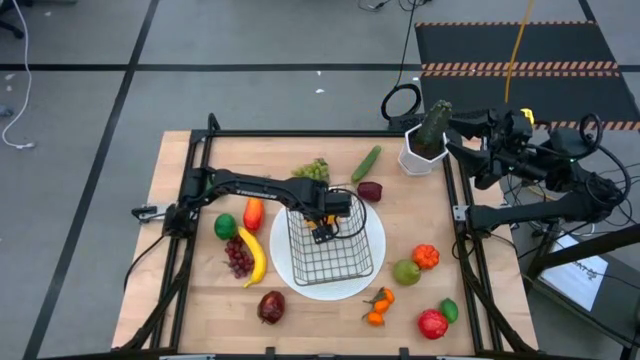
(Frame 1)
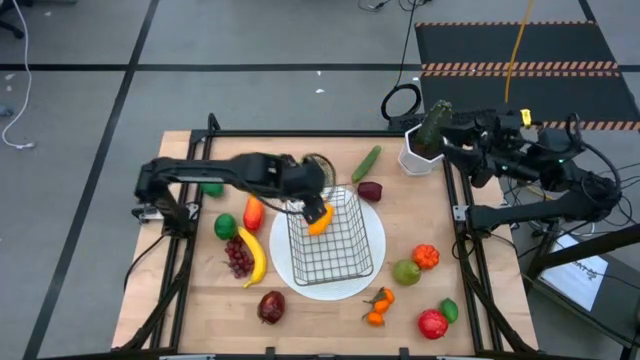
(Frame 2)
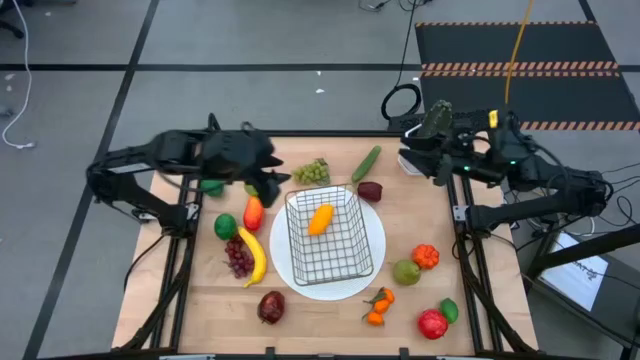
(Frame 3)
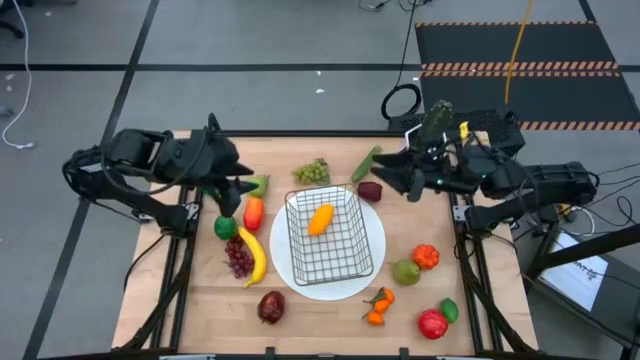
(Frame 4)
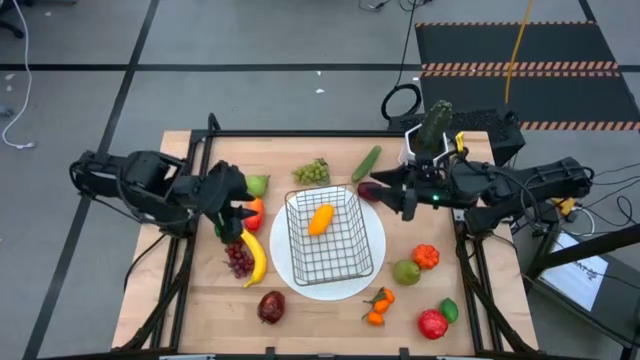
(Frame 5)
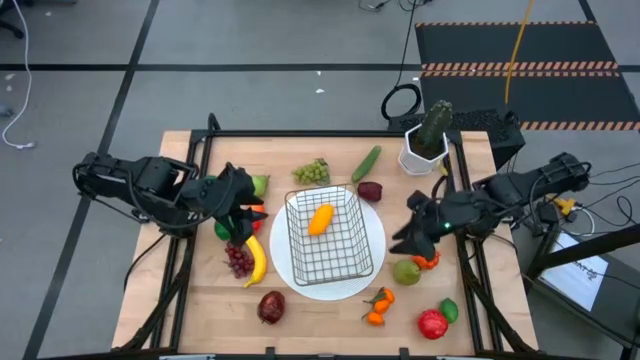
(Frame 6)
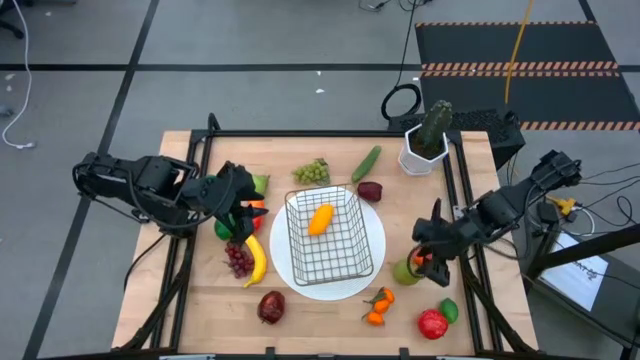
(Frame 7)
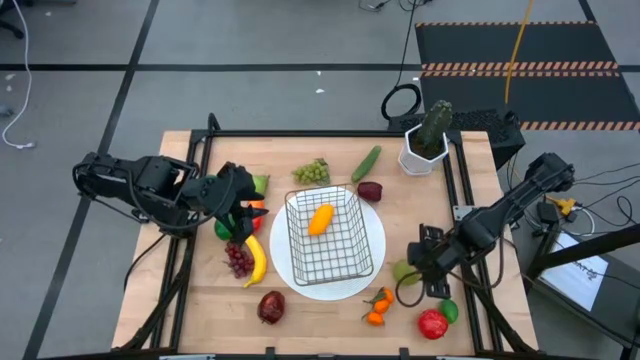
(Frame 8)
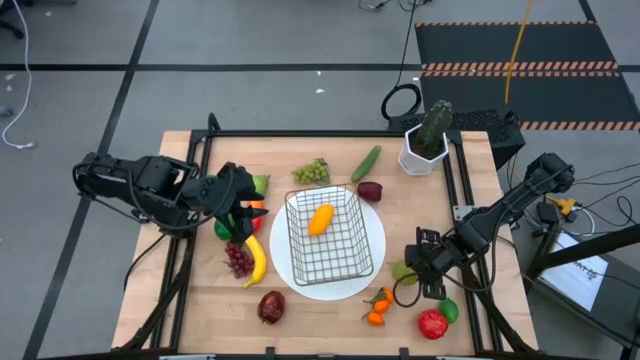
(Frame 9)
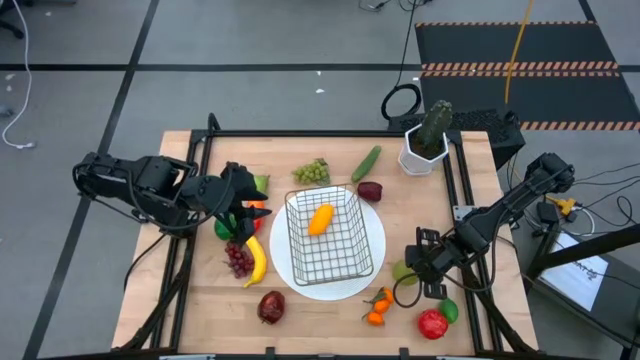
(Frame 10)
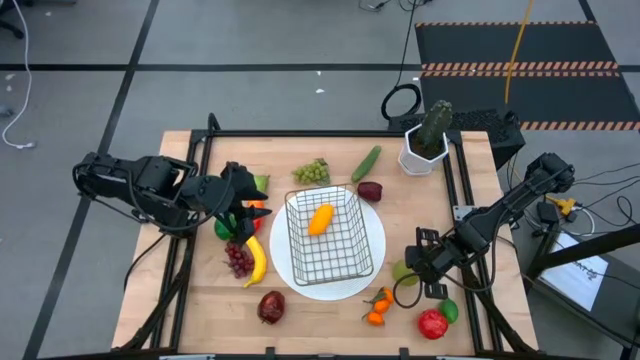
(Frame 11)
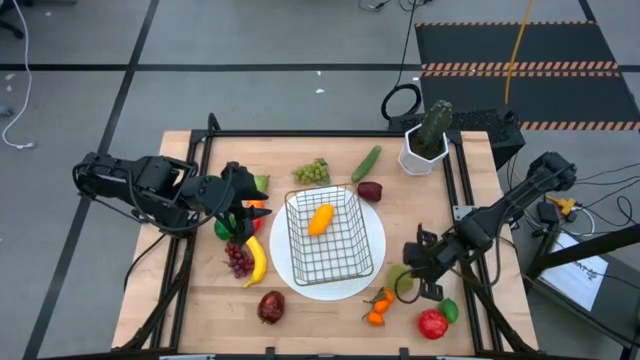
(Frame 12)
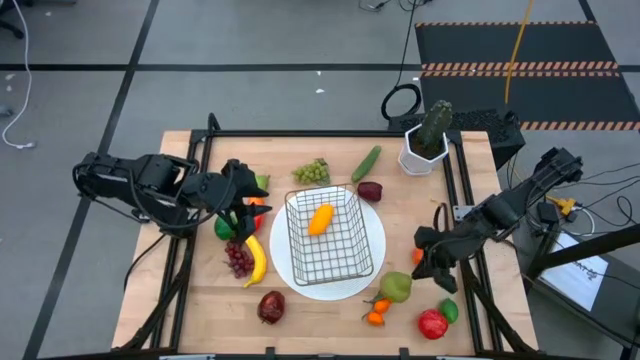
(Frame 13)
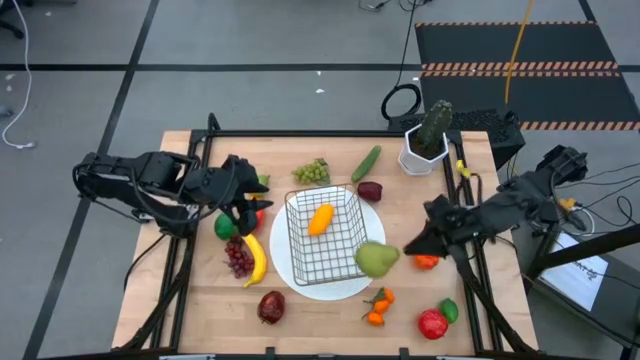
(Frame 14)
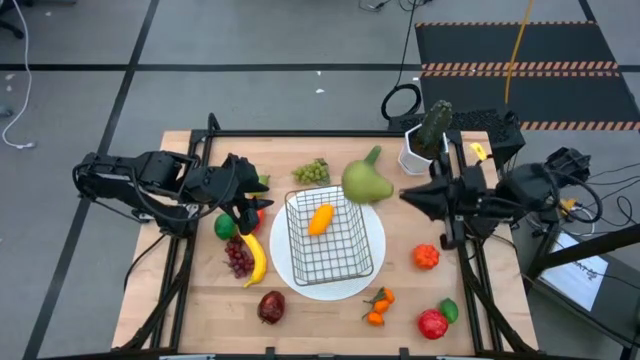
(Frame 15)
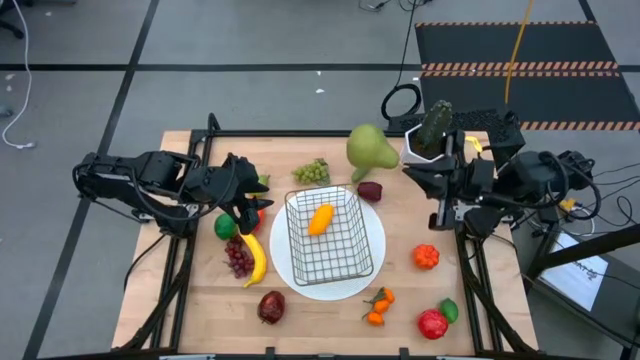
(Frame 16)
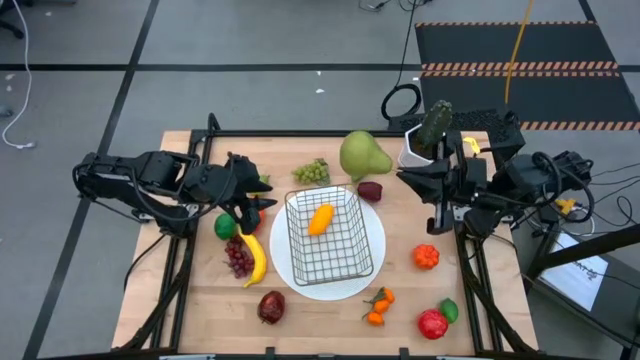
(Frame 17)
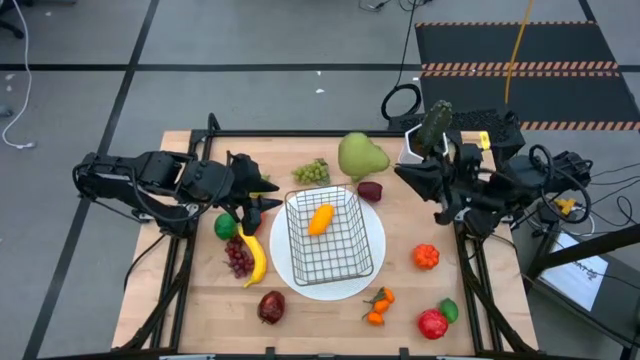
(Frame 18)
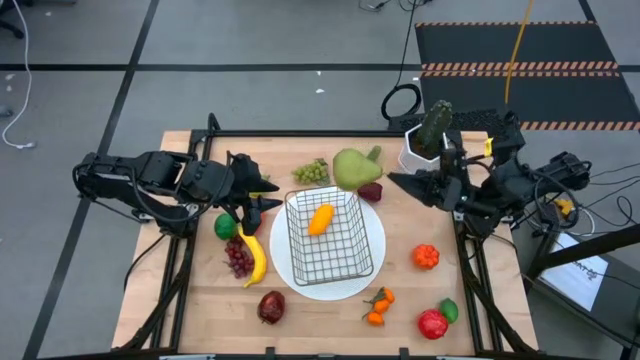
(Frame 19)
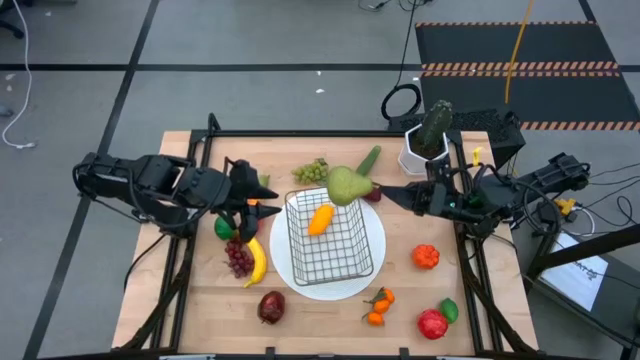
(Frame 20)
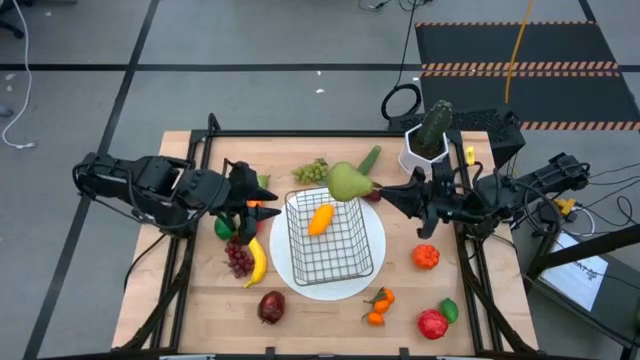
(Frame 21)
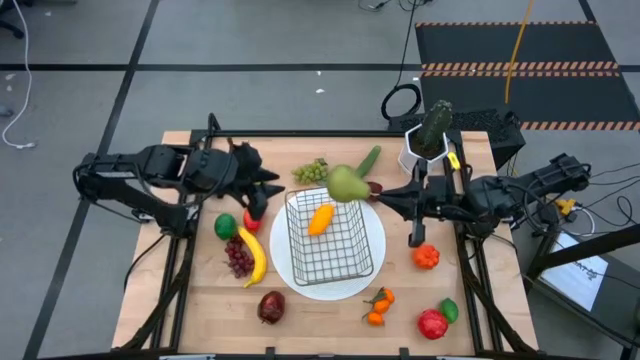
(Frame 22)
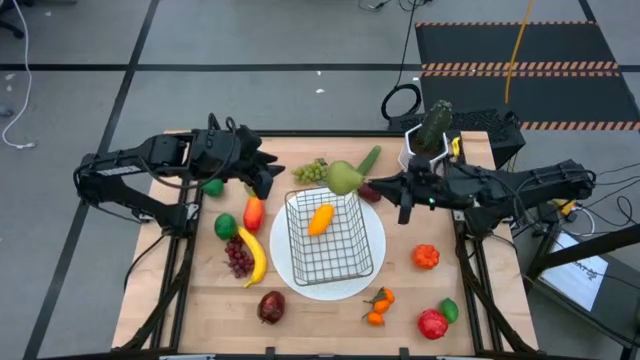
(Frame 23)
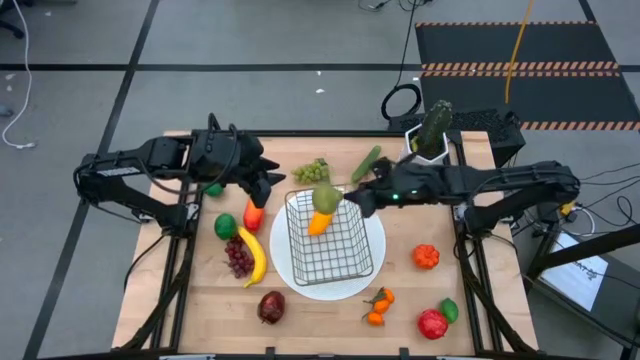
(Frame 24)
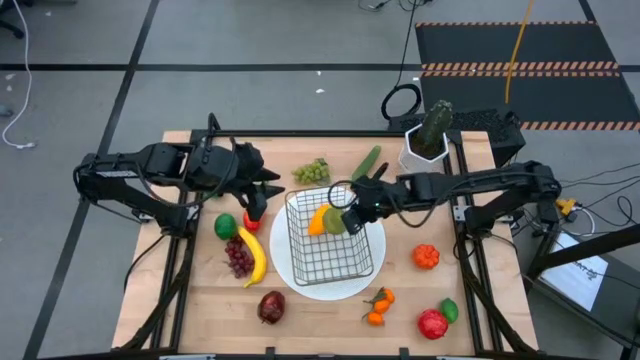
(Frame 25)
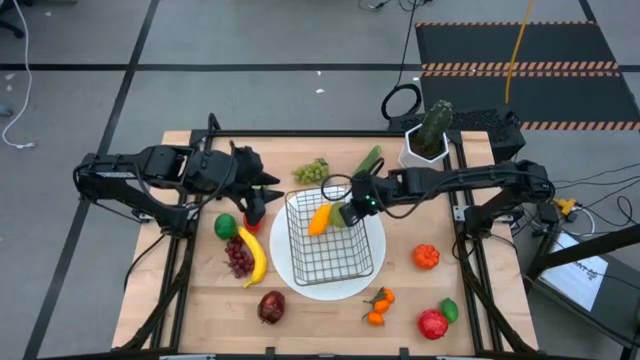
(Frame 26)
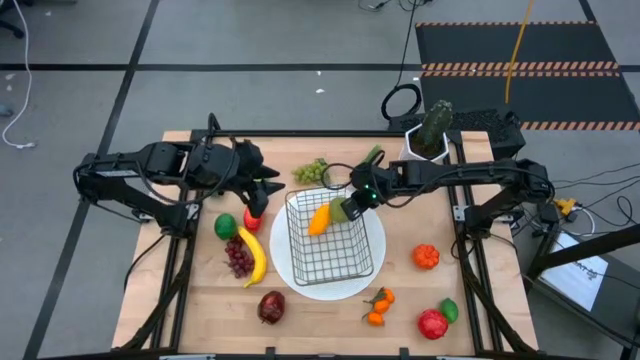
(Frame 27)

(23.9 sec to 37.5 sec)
Task: Build produce basket
Put the bottom green pear into the black wire basket

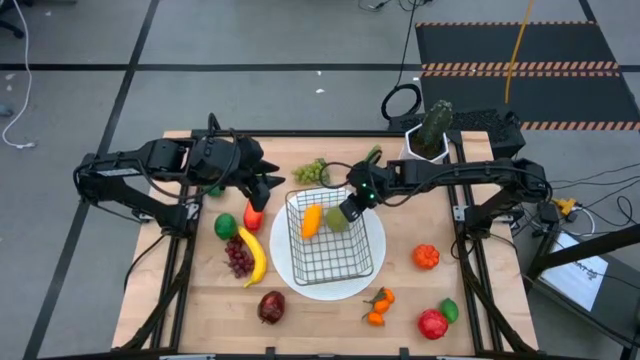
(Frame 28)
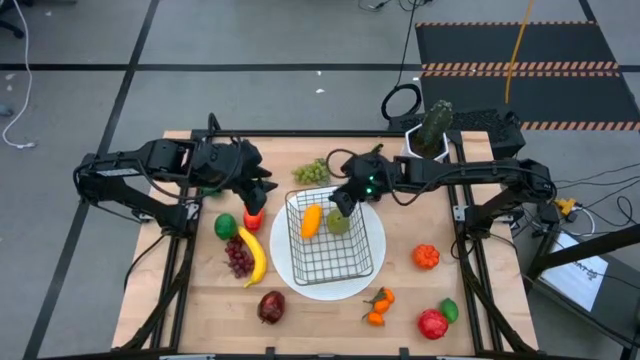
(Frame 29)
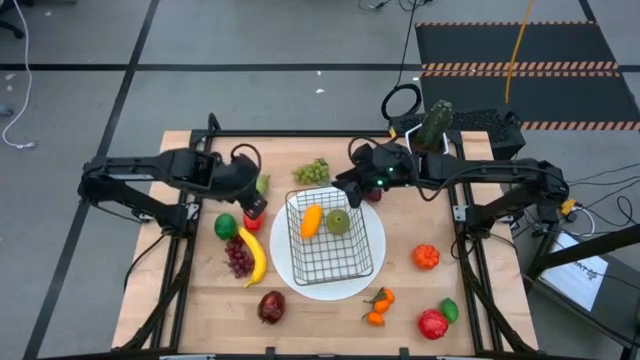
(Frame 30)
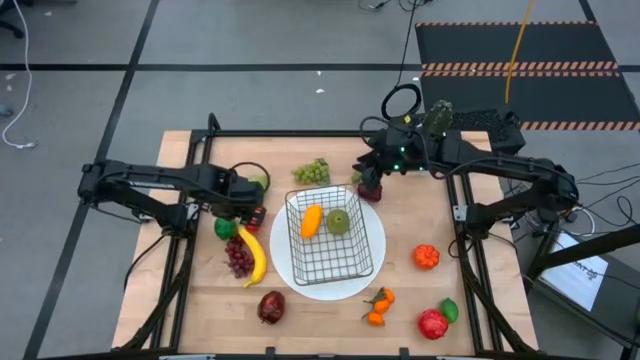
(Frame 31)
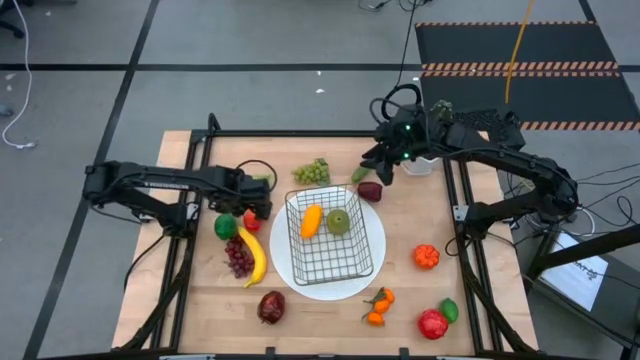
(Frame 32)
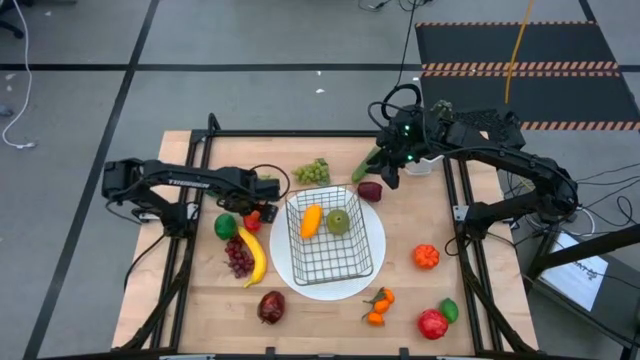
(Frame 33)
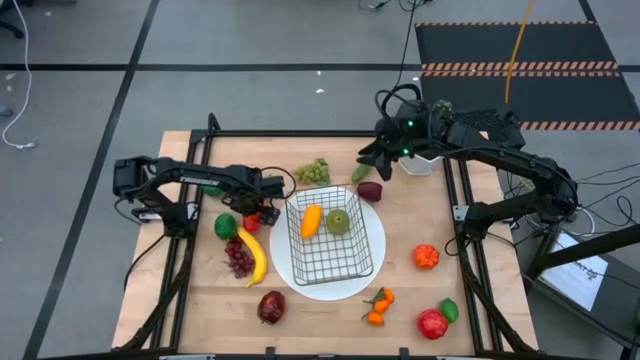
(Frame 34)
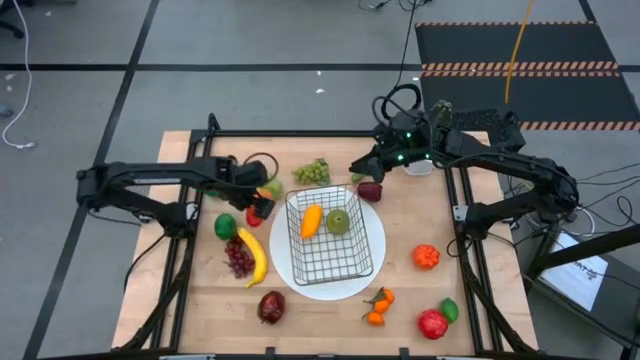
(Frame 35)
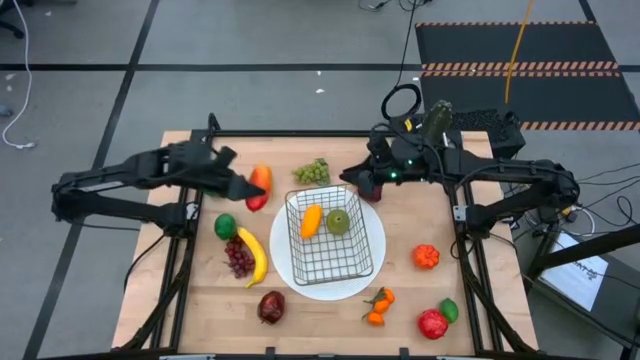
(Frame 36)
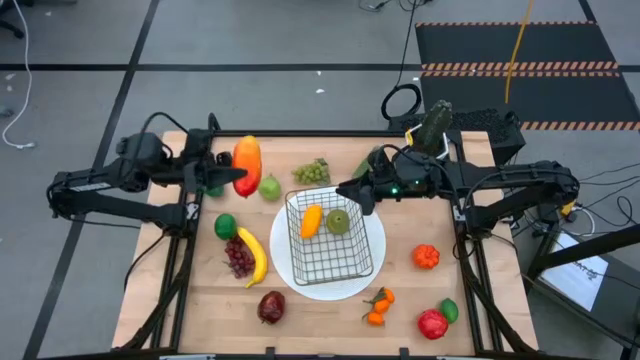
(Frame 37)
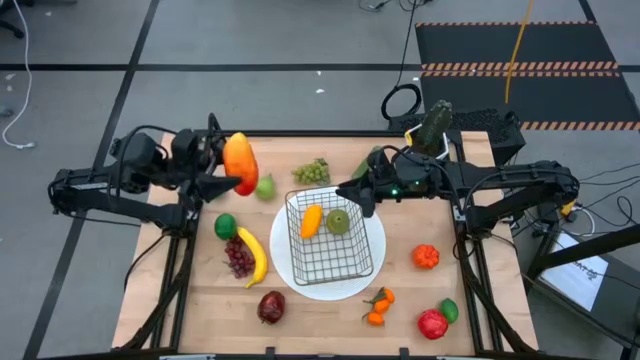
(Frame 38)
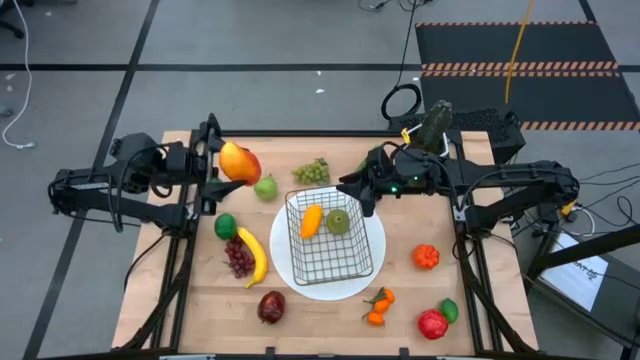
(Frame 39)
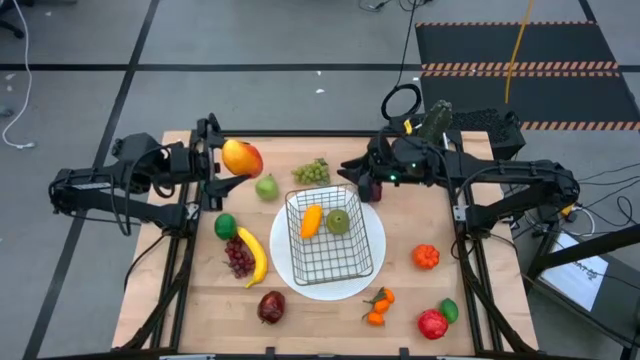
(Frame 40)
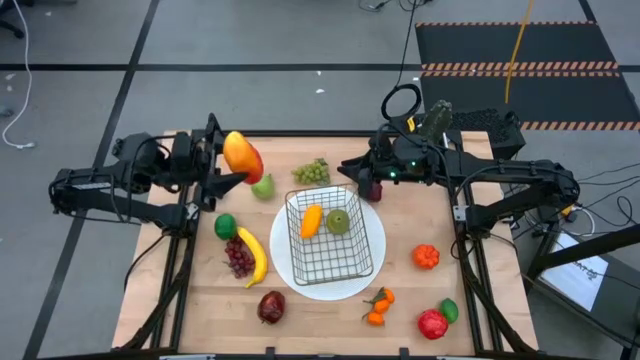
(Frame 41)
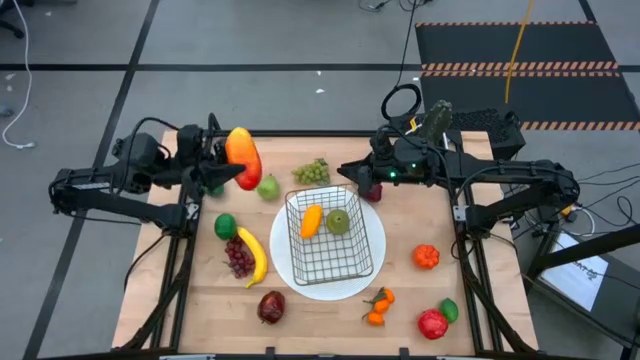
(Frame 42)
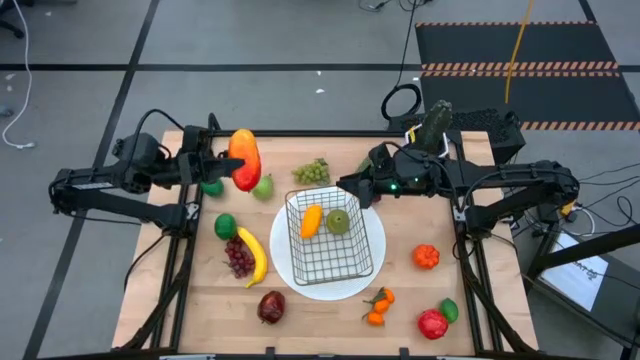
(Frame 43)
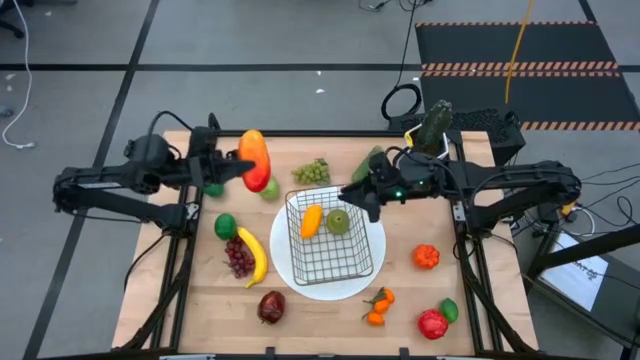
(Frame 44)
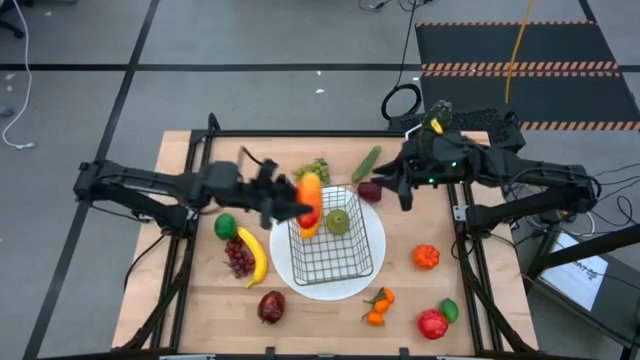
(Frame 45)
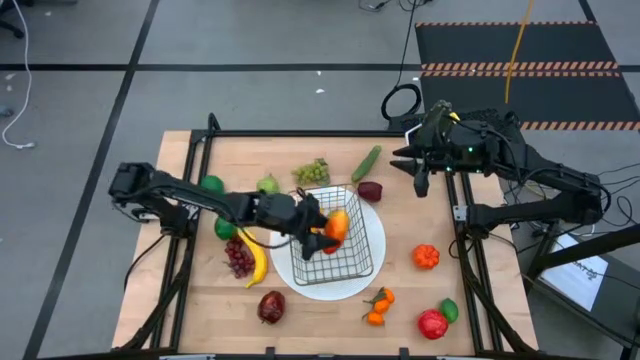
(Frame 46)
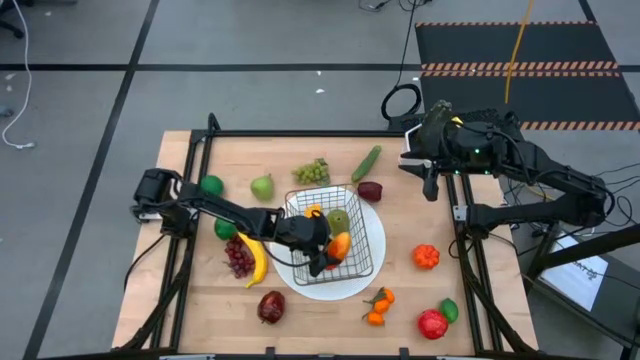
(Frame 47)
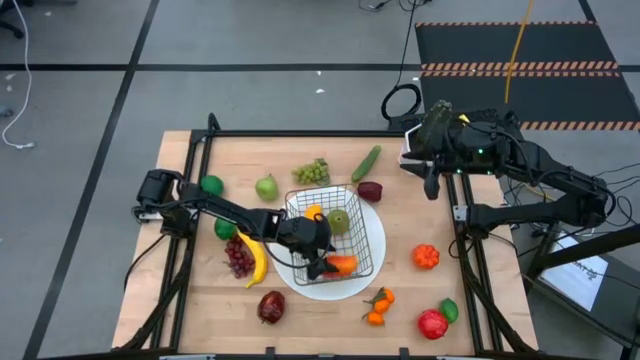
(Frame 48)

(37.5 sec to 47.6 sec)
Put the yellow and red mango into the black wire basket
